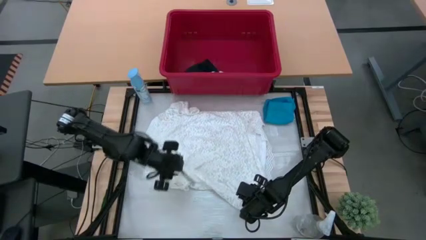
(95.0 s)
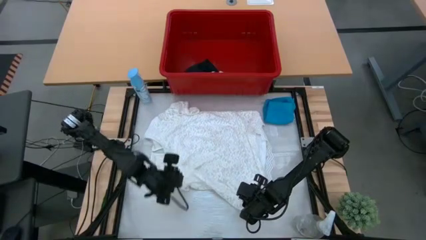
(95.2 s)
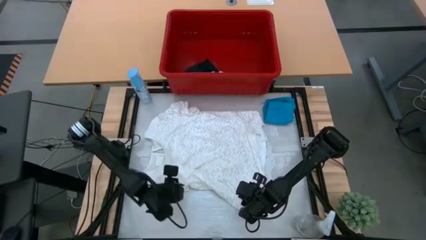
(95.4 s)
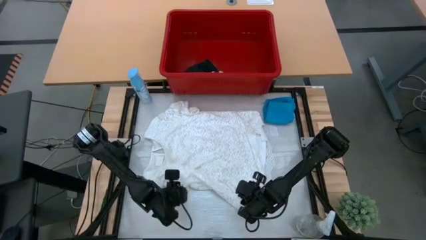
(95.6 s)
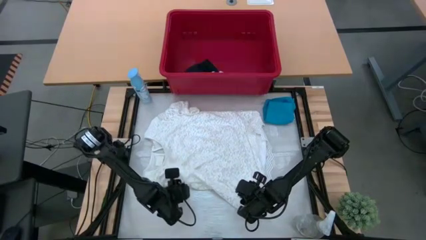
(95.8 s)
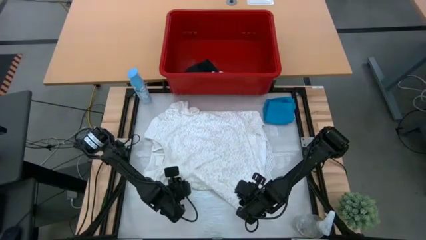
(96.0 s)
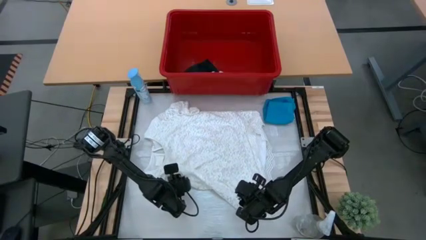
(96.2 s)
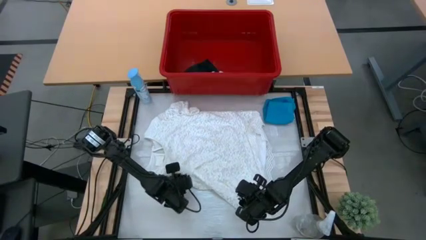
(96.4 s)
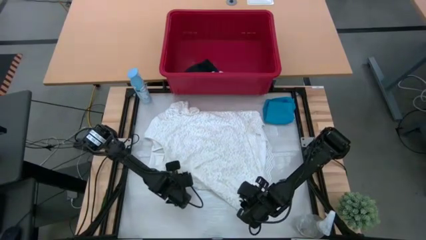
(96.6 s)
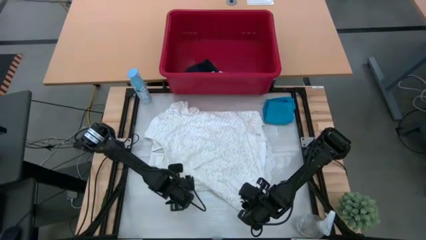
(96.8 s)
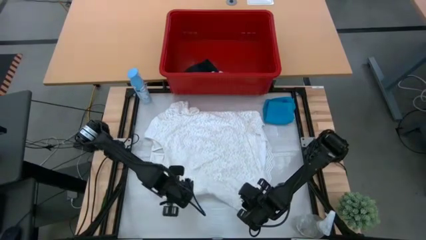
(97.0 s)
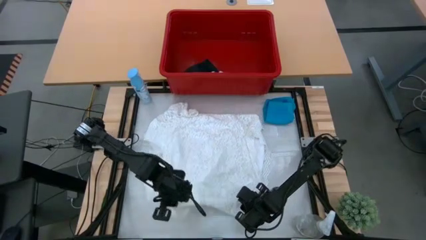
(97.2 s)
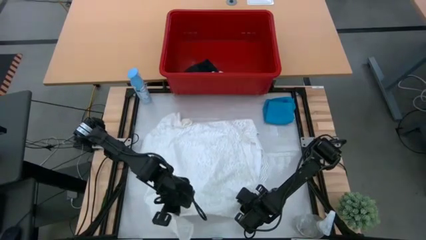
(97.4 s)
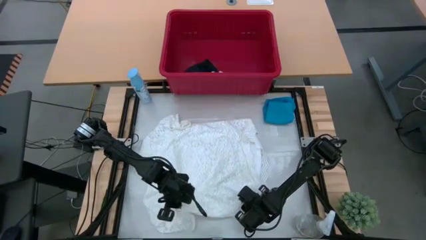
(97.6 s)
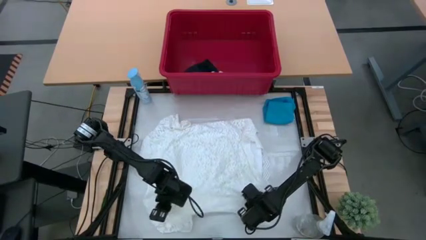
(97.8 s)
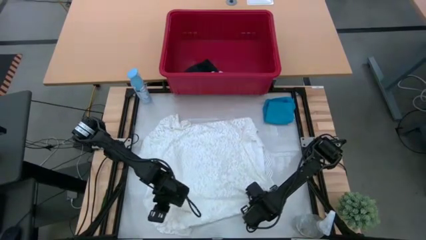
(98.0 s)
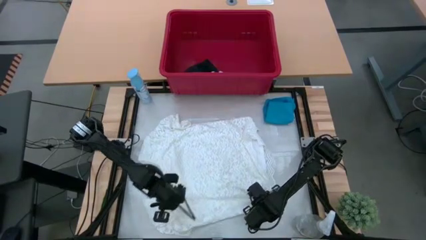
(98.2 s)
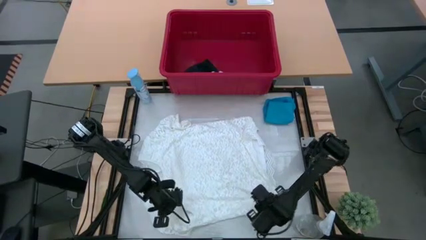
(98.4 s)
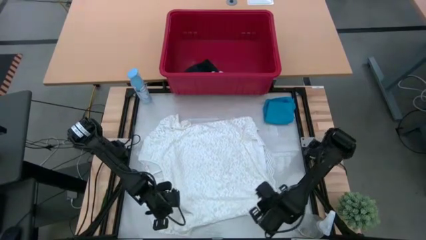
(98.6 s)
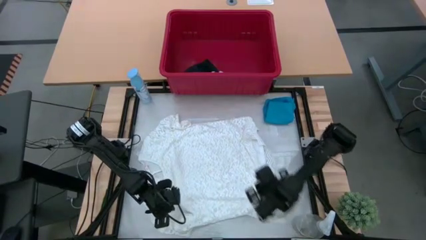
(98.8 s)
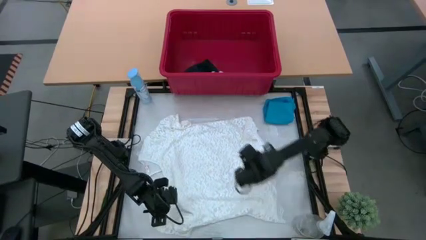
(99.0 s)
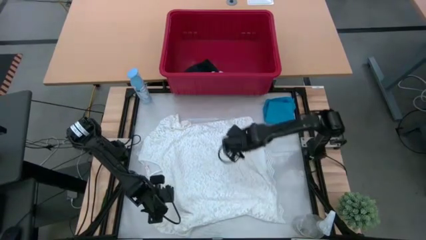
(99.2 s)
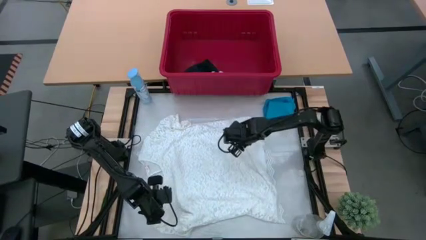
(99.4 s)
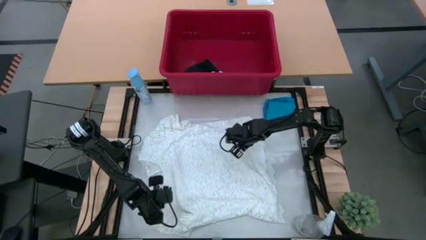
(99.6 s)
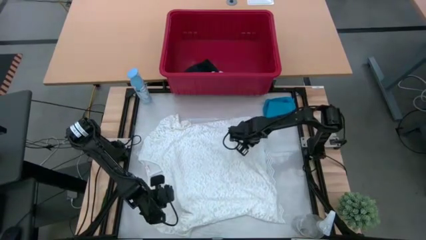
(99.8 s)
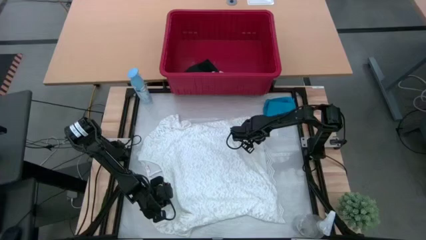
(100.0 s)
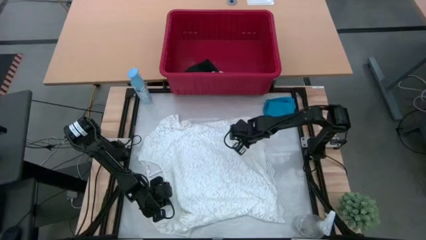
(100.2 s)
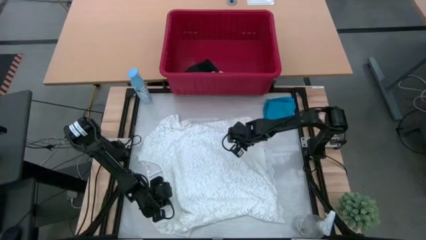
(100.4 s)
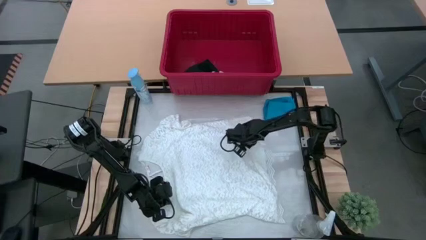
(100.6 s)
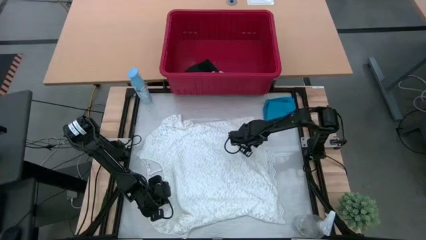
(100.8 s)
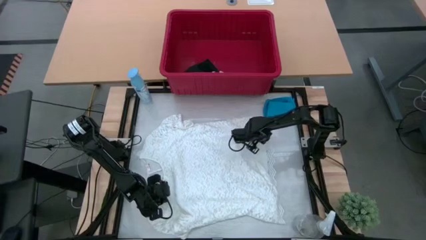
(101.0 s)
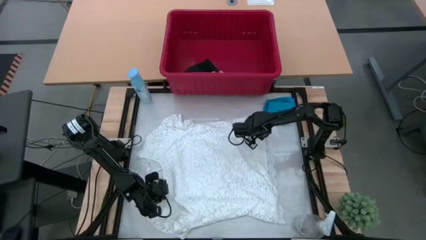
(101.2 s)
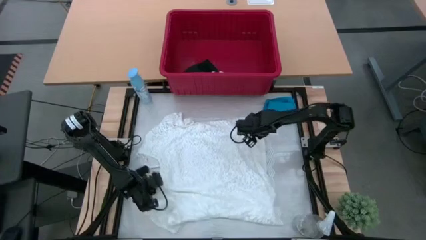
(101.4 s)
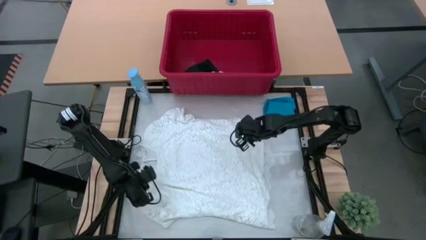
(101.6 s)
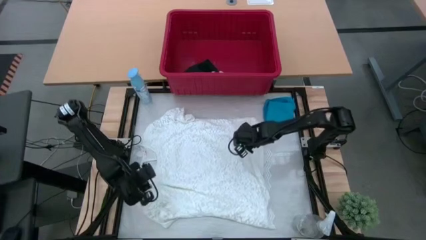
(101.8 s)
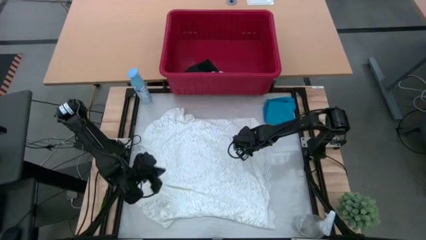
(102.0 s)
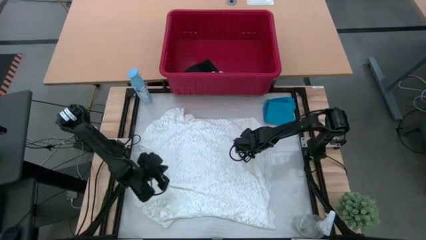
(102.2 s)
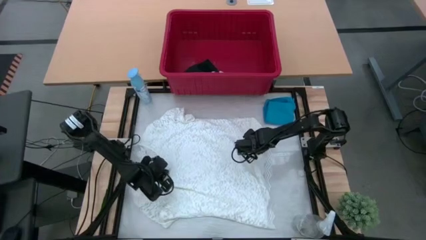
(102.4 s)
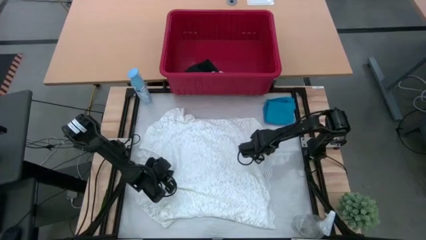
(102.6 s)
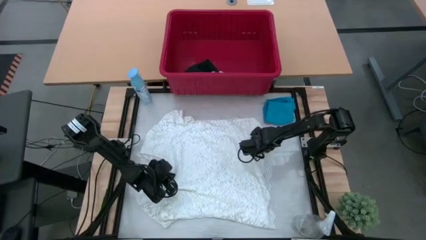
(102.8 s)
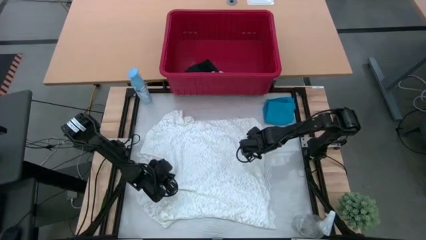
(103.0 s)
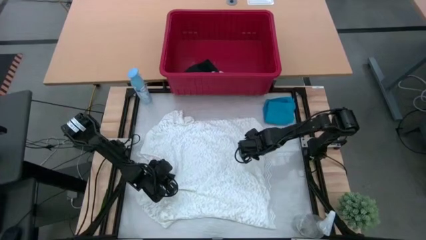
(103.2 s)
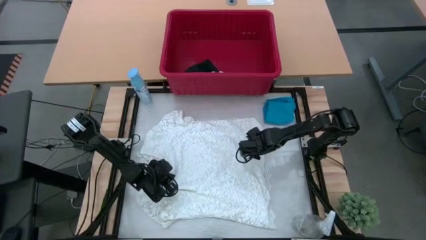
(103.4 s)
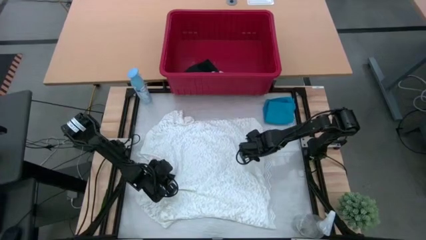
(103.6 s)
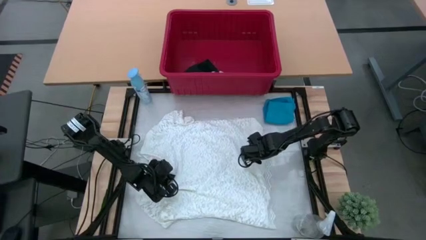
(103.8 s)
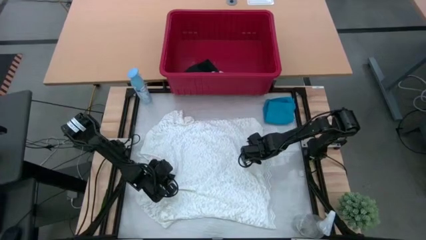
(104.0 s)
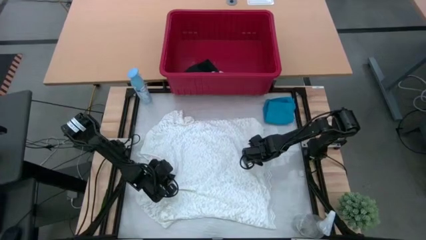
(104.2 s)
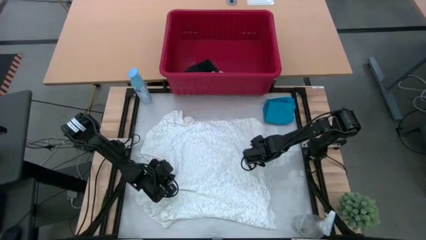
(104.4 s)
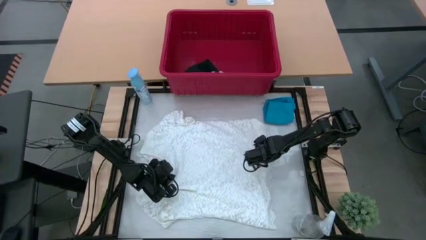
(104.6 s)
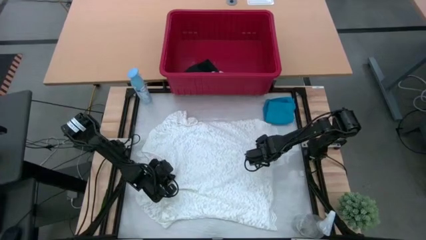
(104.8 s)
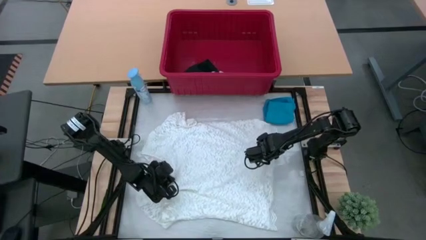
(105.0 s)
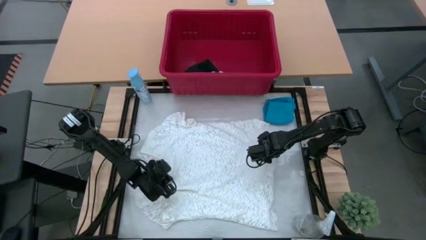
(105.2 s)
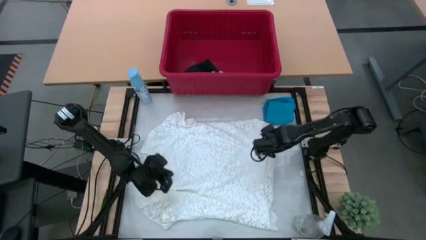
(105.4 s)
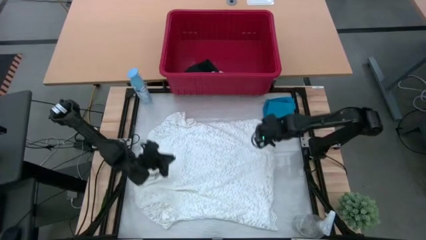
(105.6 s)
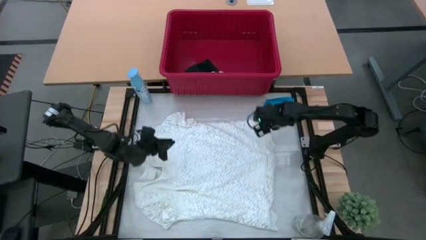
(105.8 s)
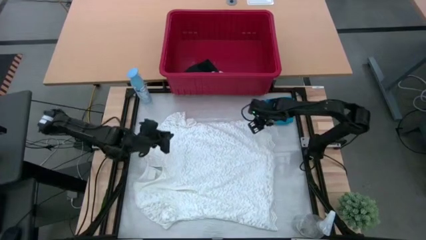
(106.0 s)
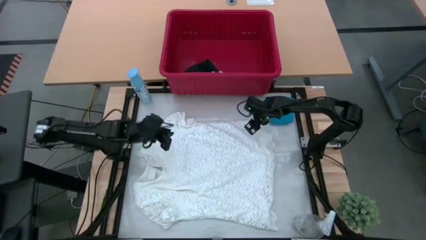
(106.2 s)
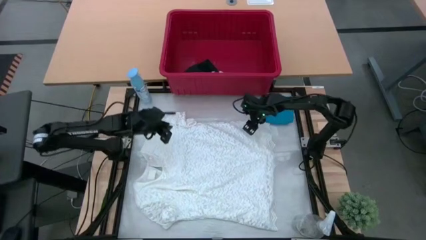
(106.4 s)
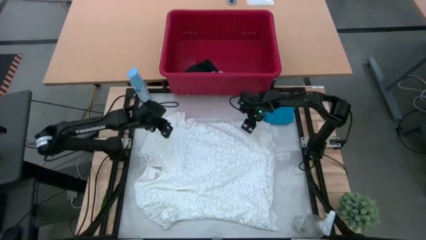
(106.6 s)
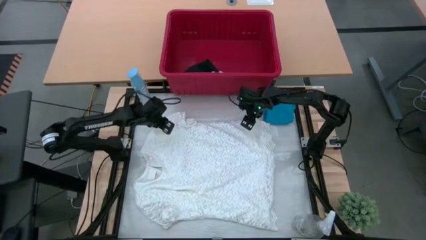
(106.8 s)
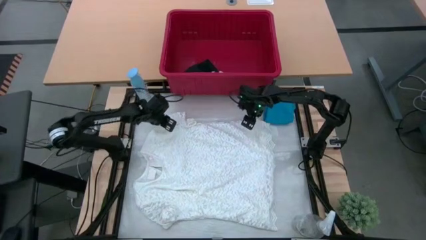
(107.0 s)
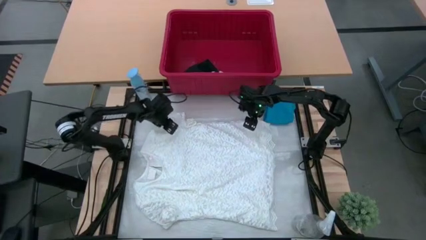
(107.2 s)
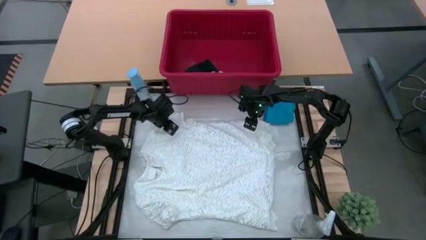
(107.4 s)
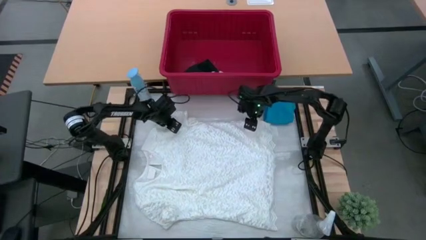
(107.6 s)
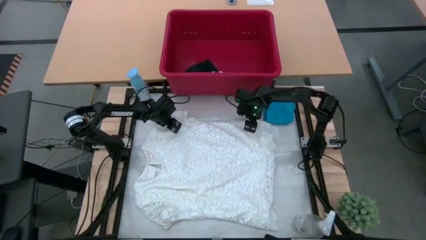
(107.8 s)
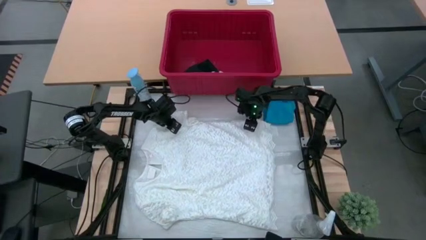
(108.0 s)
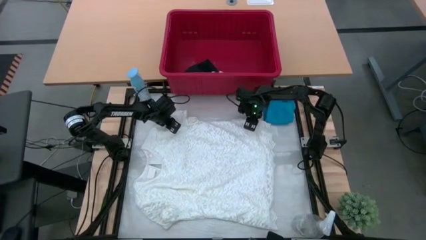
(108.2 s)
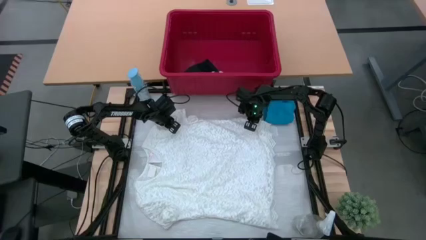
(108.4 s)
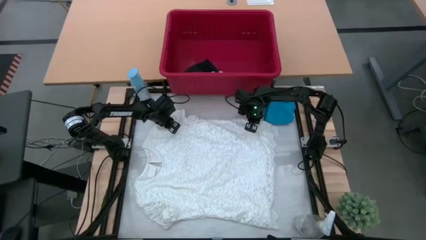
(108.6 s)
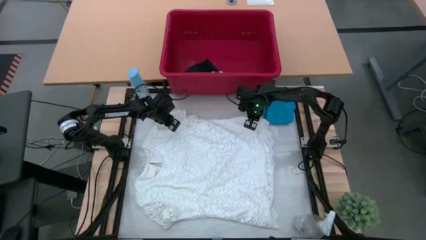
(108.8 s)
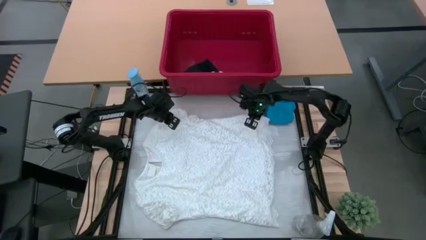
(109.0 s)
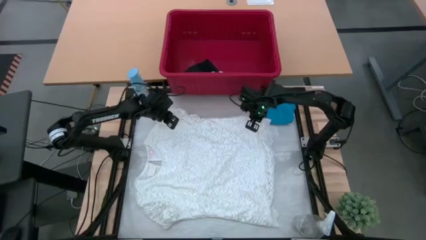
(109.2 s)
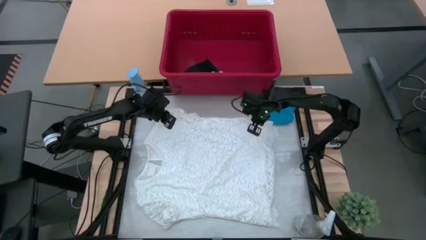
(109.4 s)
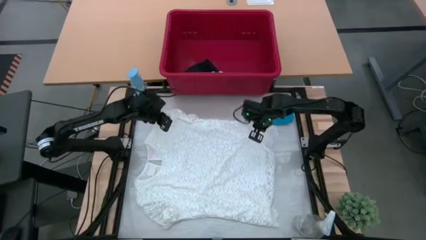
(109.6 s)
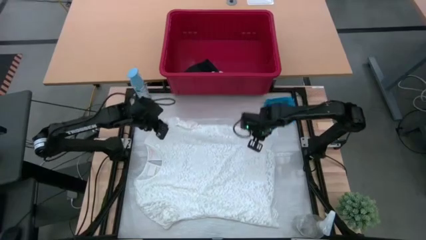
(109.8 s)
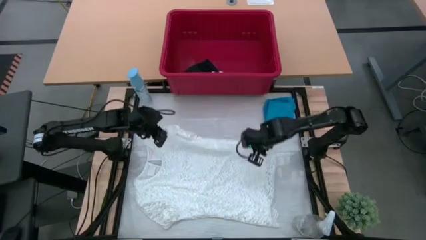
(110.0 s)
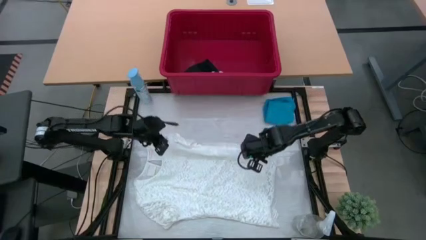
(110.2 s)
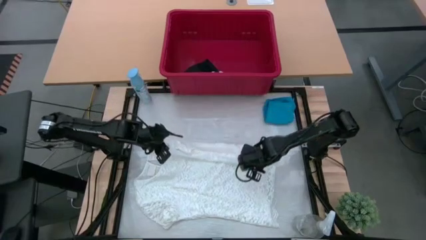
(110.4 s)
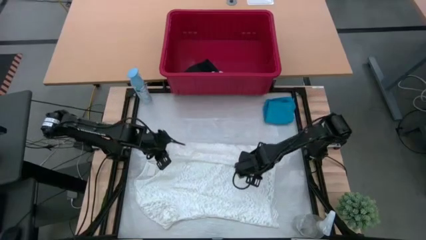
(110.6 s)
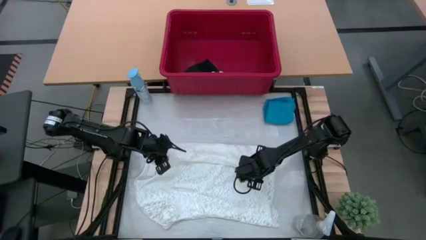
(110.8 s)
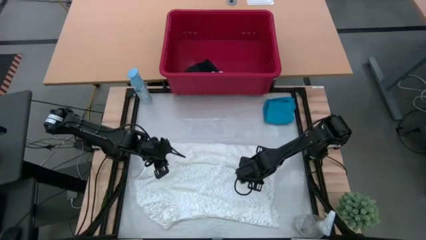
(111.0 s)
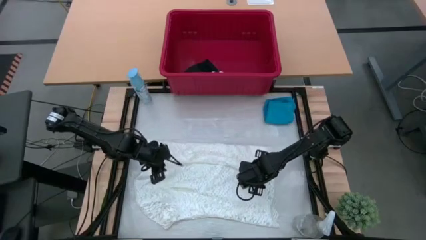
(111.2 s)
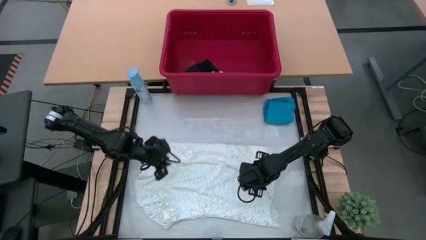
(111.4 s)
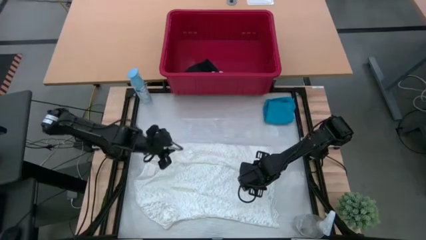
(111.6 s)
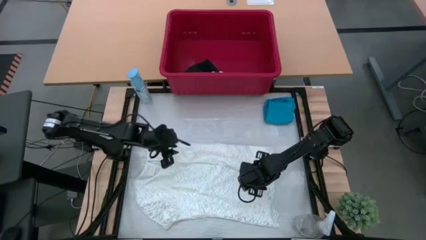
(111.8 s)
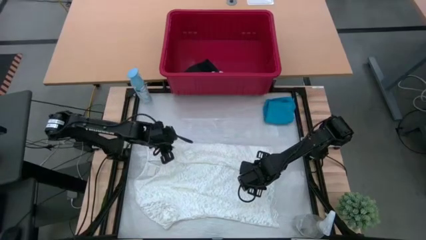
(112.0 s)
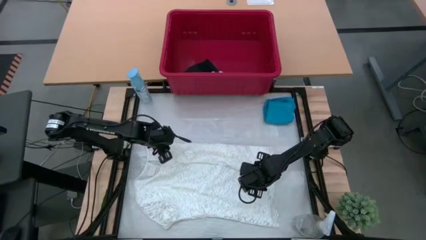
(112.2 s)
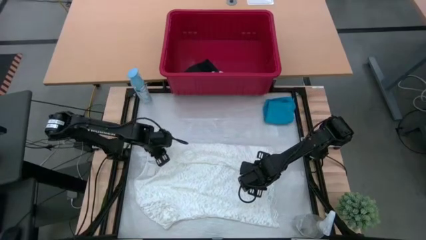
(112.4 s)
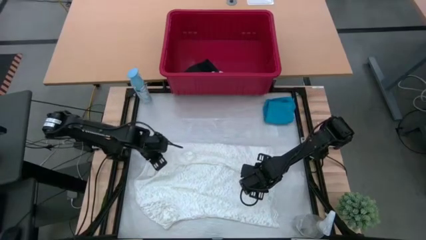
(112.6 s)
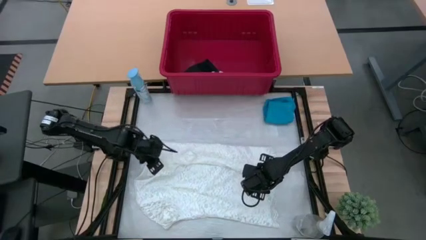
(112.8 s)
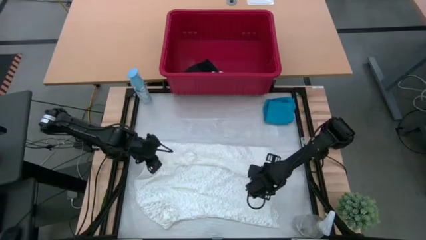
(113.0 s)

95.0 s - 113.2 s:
Task: Fold laundry
Fold the white blouse
